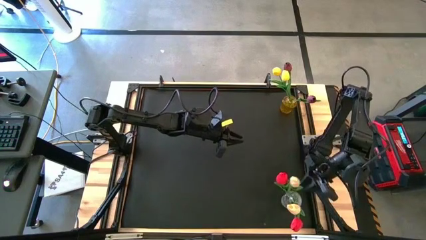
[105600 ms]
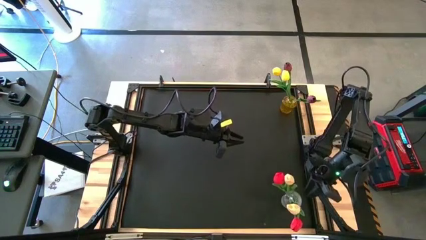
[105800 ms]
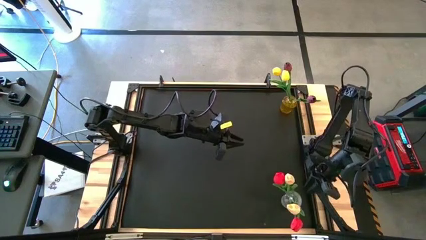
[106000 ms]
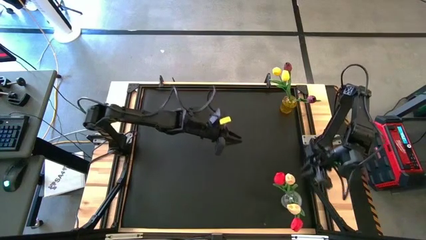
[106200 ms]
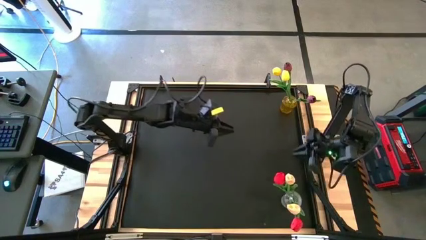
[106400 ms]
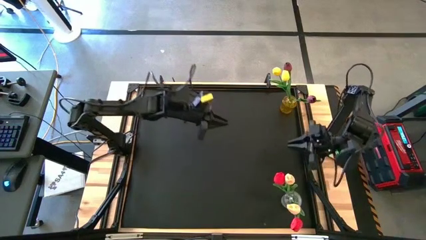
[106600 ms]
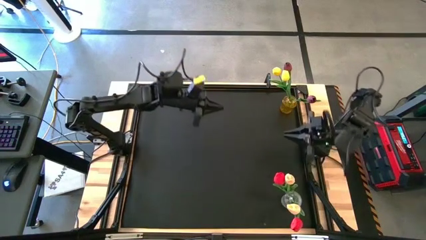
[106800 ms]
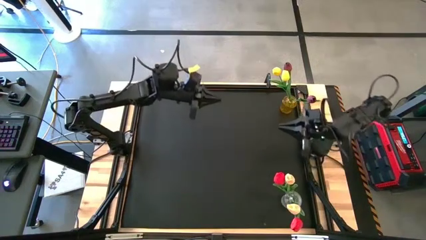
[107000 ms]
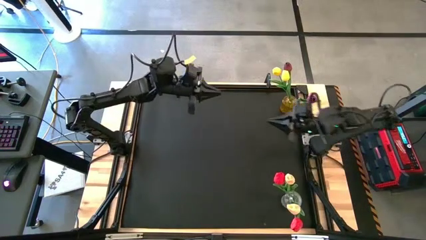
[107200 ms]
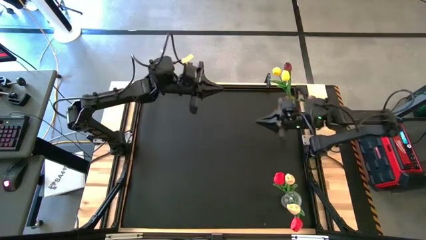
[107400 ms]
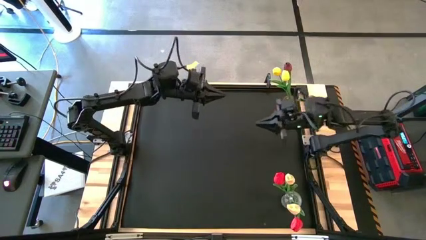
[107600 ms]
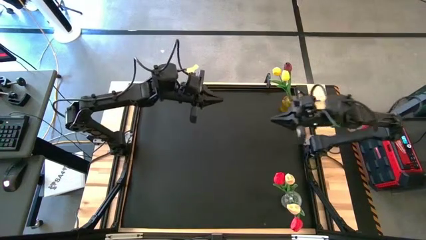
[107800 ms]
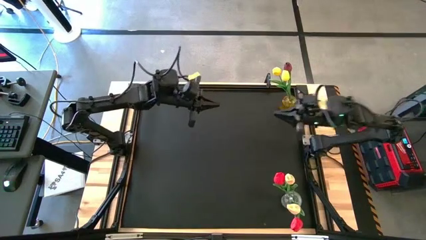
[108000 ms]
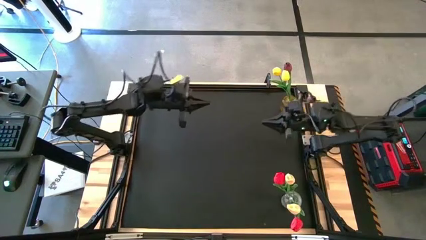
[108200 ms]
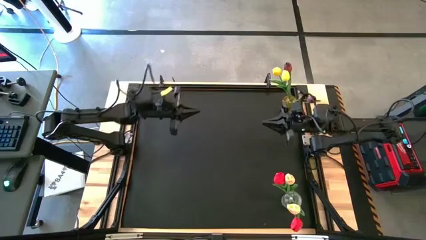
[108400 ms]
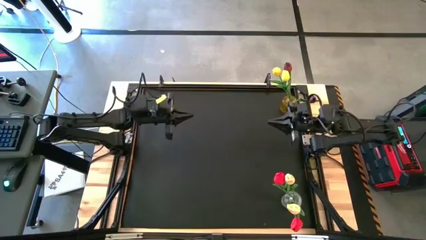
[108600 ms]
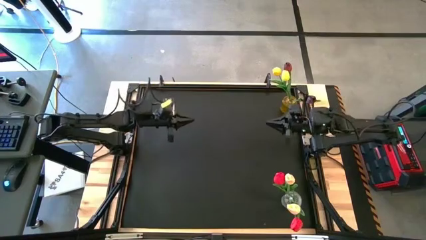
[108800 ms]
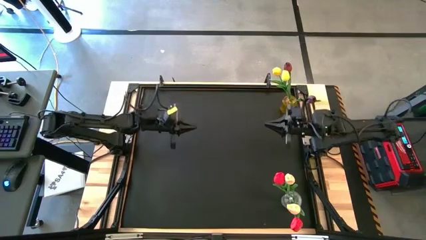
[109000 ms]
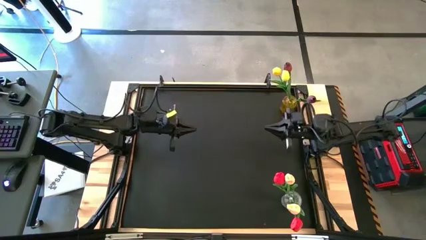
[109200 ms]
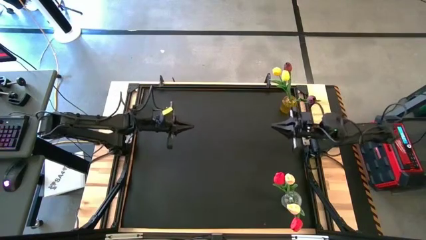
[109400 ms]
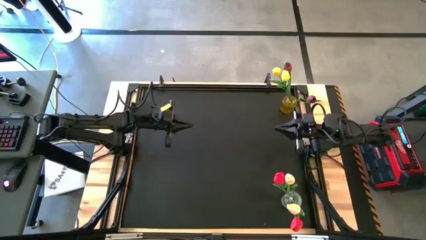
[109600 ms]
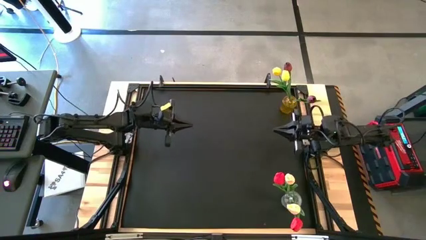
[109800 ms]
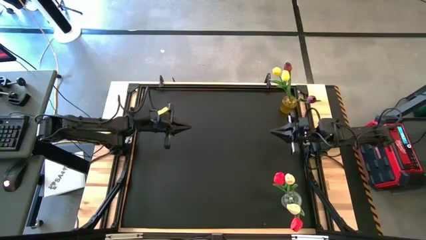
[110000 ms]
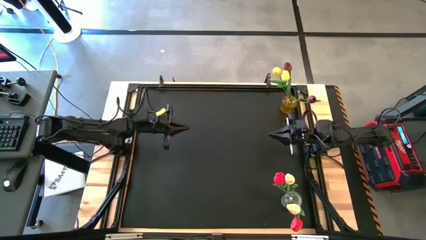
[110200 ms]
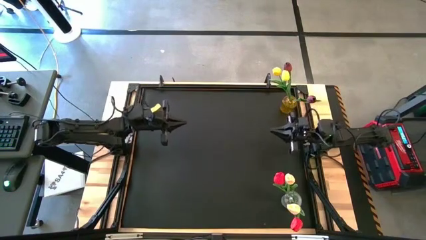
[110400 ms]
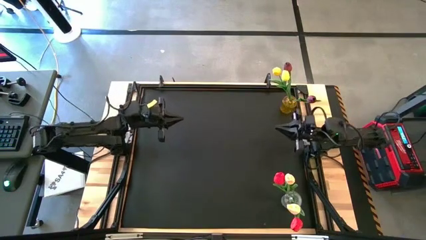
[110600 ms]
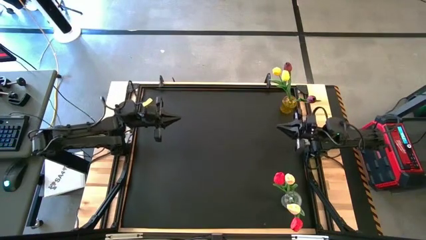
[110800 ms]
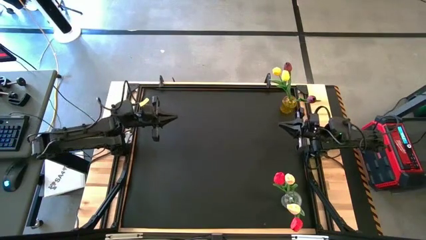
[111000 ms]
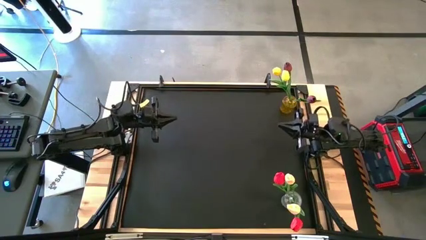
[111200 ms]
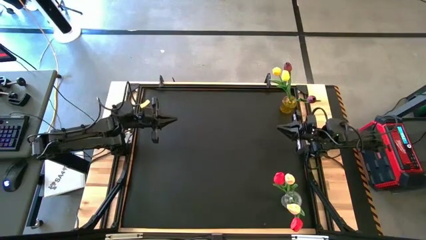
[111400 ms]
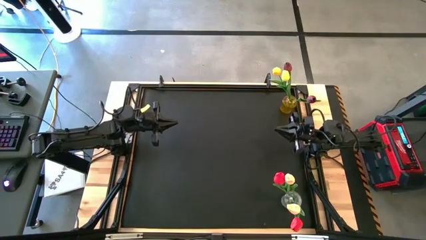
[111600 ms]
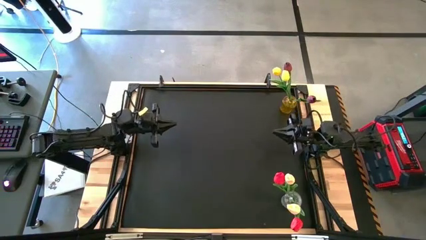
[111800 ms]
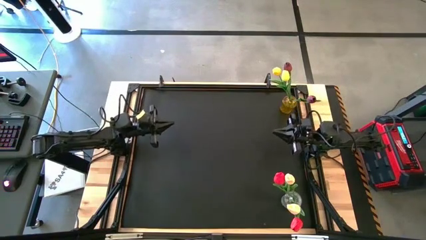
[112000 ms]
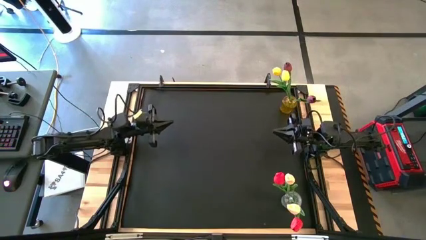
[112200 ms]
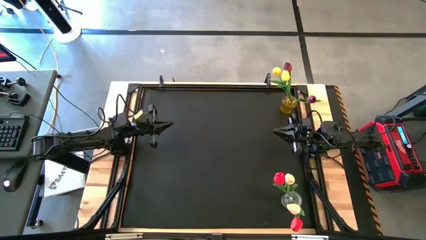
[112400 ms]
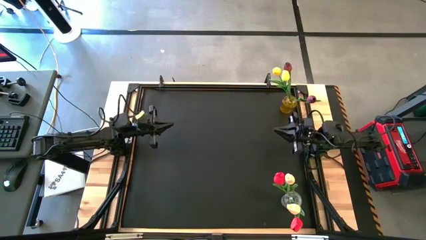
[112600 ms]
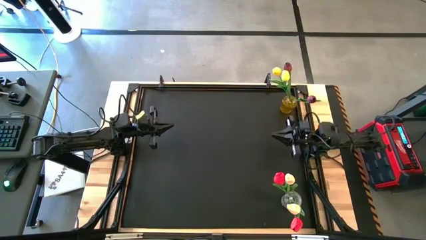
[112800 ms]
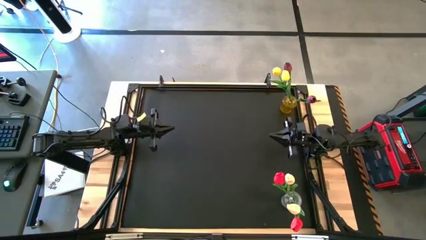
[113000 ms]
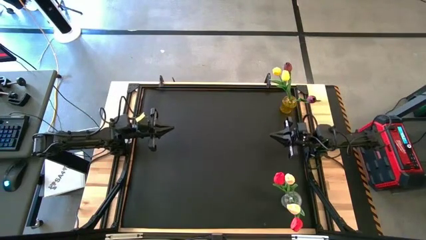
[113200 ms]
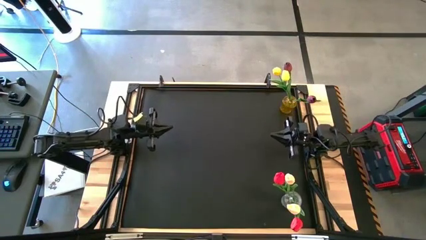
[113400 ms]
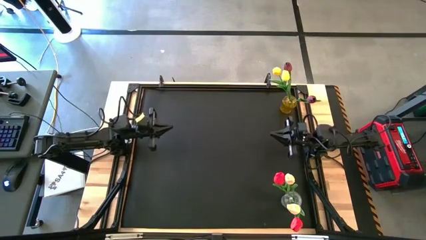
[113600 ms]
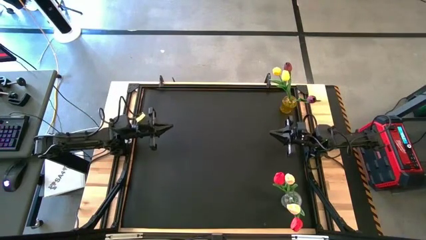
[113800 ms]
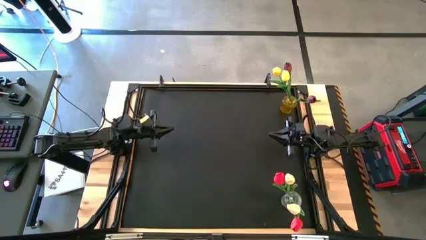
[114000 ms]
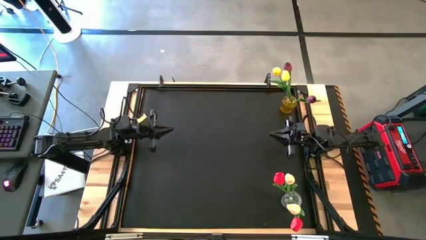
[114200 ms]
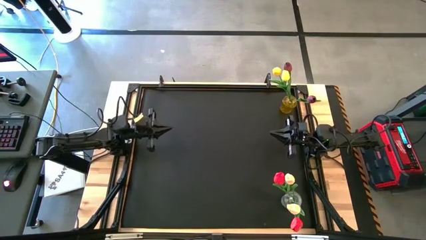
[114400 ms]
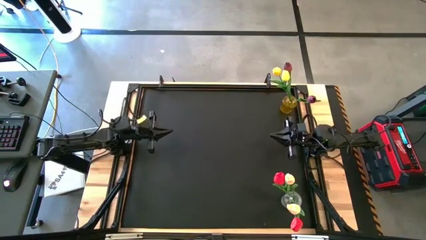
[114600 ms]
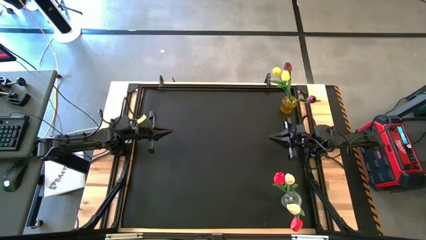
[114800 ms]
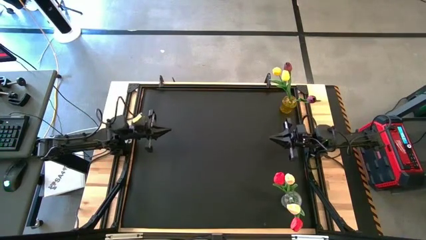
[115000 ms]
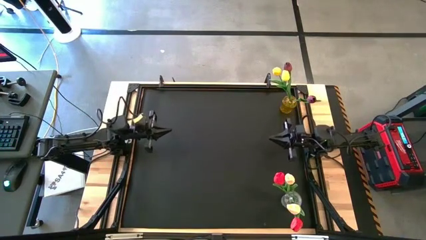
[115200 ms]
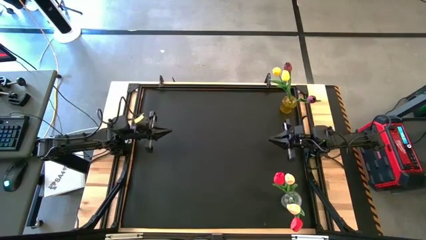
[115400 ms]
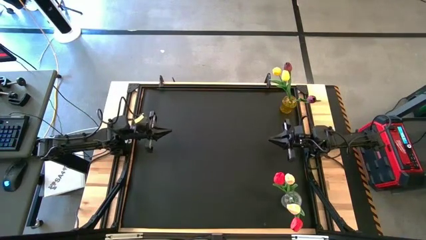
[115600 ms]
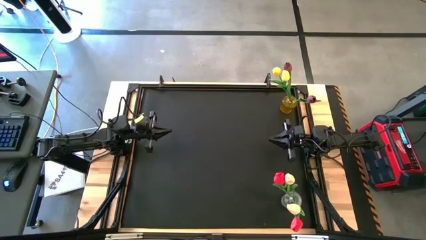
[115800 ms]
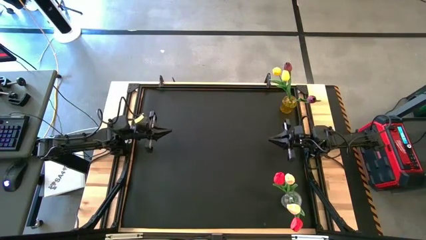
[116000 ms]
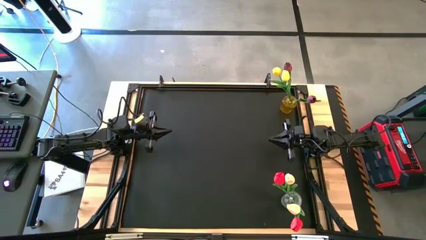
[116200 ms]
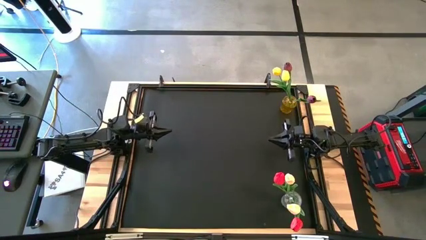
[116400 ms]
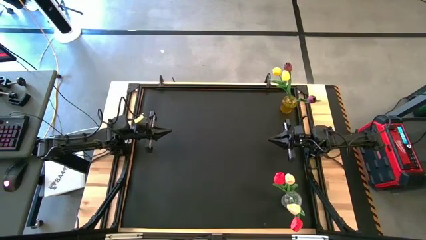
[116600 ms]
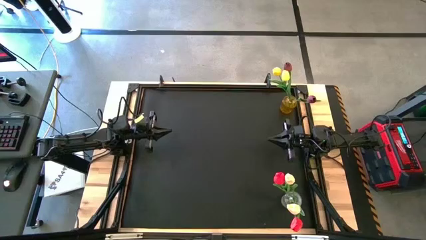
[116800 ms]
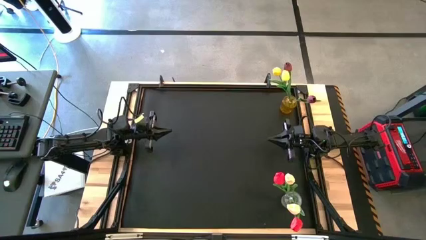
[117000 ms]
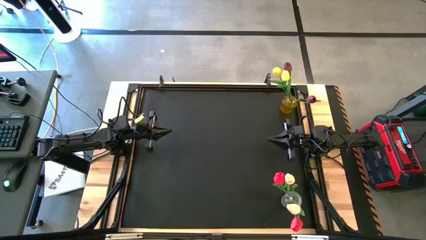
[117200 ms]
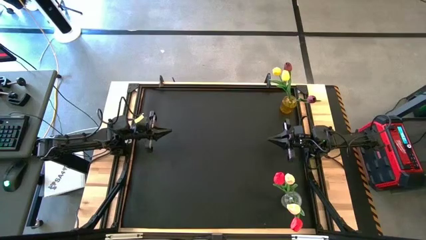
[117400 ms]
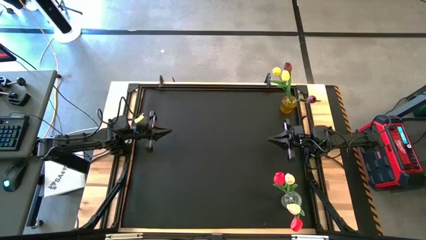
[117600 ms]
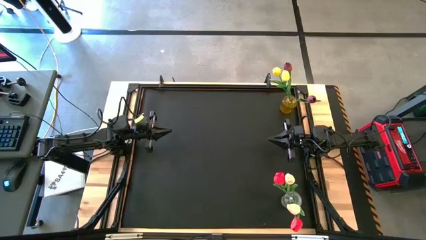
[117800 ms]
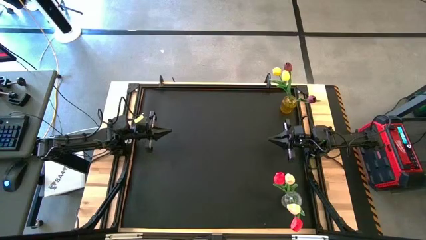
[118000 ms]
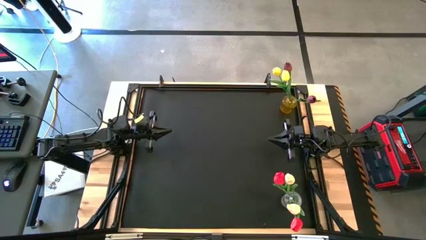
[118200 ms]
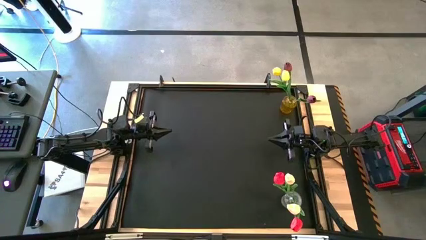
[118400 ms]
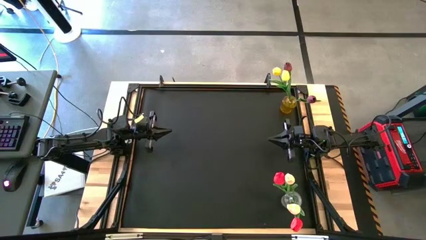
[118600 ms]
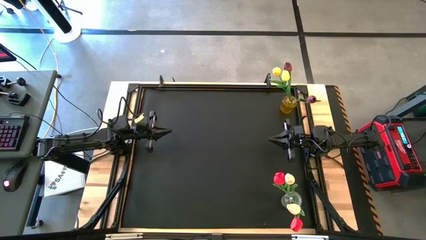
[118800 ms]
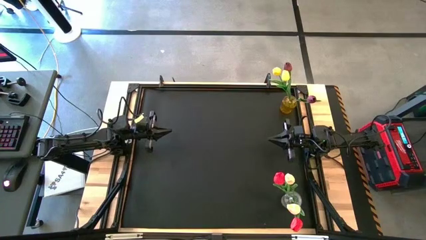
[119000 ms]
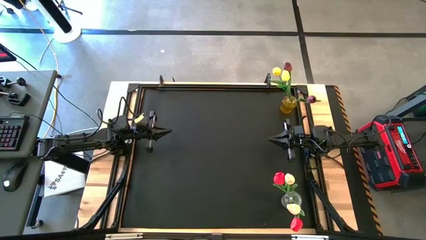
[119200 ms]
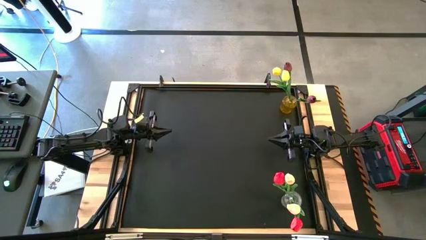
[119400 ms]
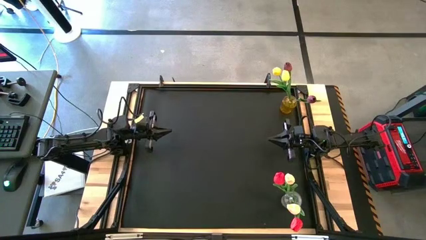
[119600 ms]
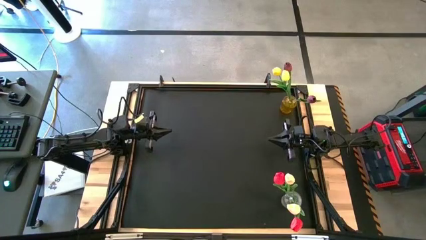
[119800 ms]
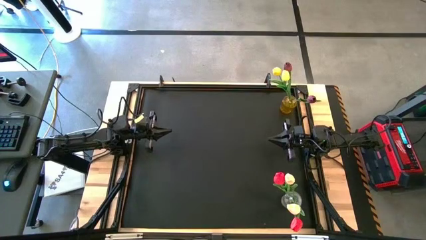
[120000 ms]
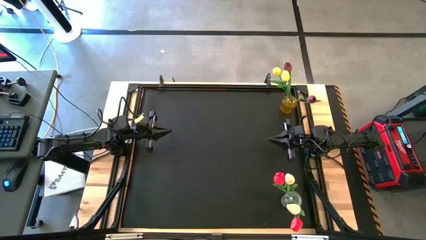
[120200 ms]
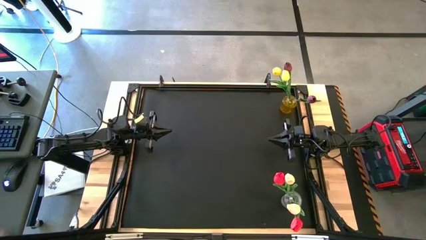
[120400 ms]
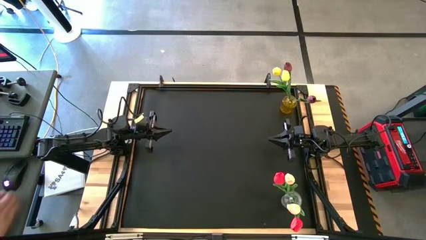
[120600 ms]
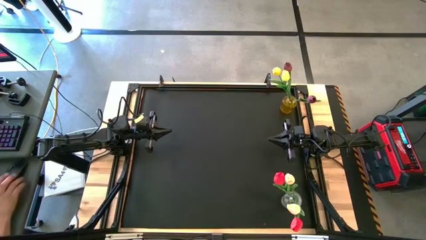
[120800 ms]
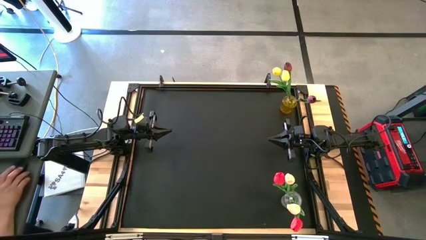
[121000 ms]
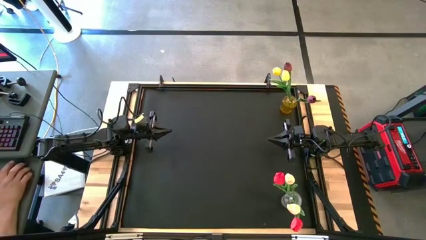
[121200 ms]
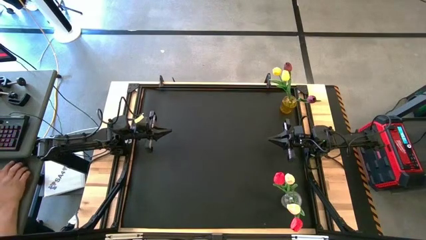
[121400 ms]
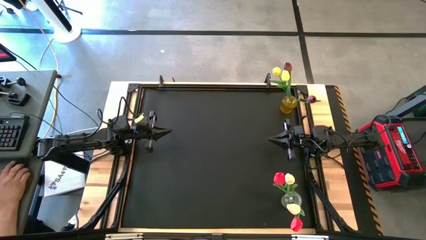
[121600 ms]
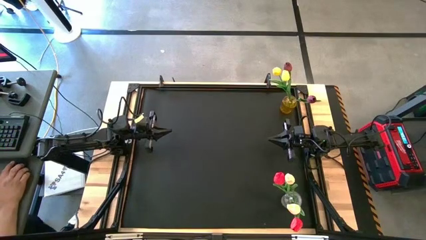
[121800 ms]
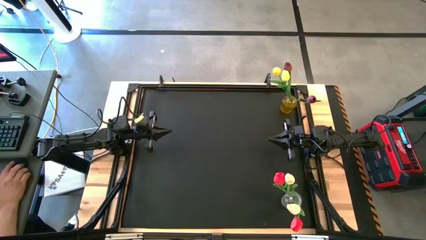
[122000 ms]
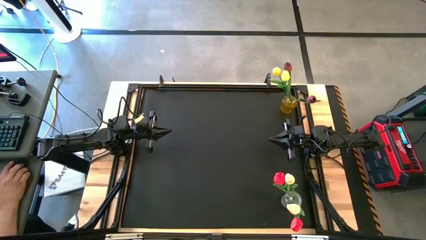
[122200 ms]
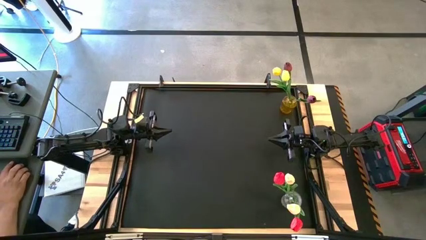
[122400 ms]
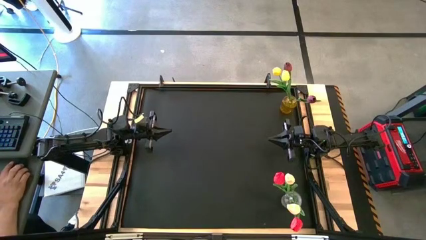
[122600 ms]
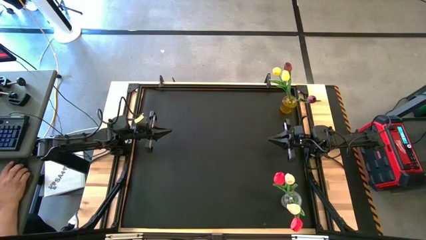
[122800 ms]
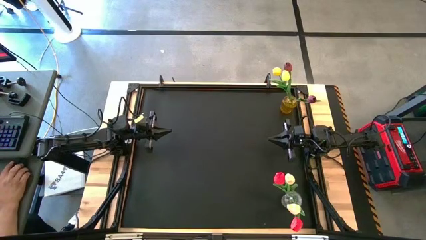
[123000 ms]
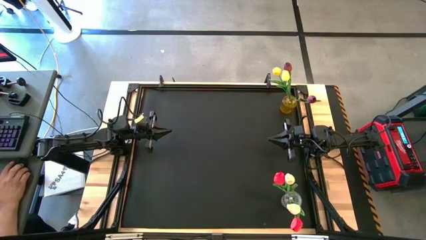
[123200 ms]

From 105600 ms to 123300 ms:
Task: Sort flowers into vase by color
Return to Home Position
